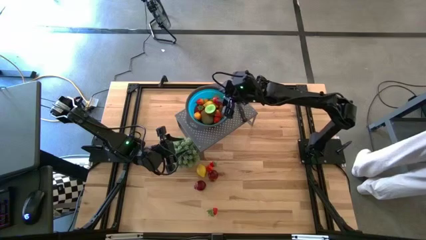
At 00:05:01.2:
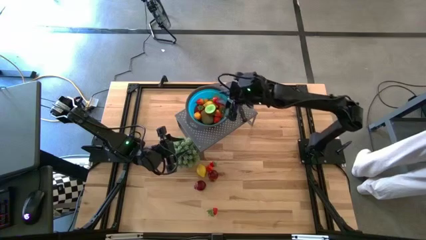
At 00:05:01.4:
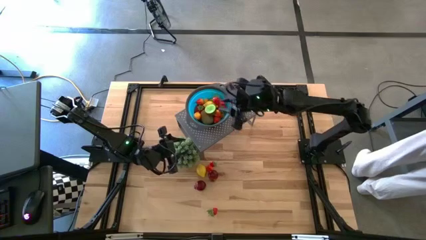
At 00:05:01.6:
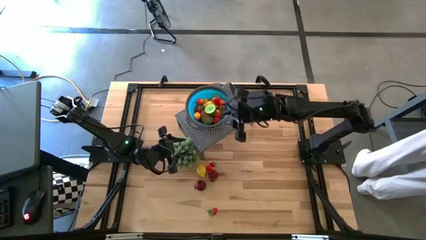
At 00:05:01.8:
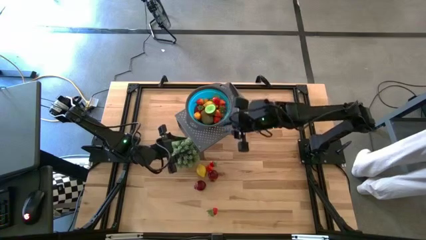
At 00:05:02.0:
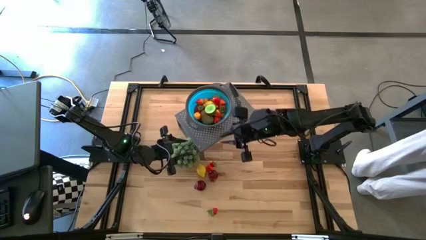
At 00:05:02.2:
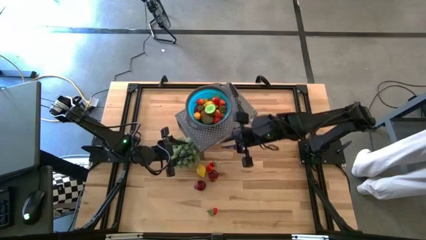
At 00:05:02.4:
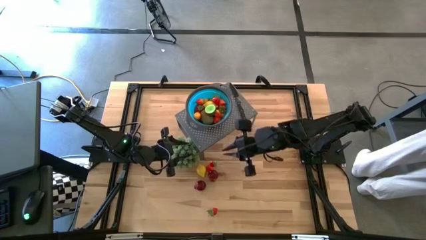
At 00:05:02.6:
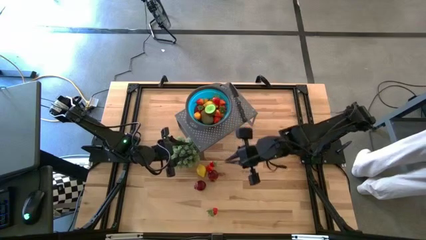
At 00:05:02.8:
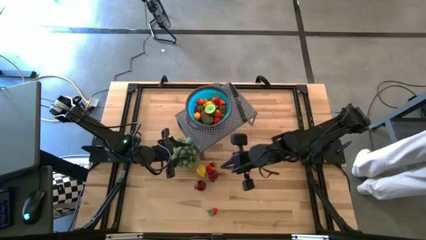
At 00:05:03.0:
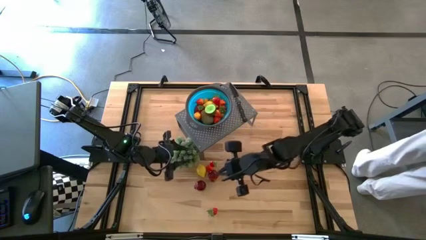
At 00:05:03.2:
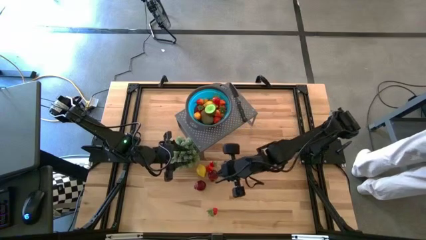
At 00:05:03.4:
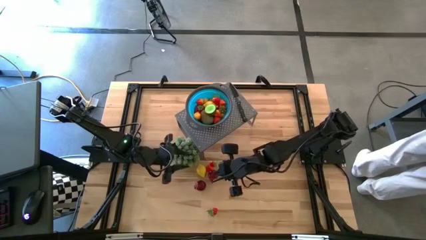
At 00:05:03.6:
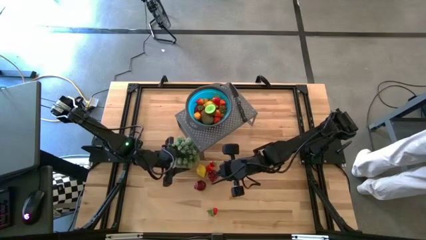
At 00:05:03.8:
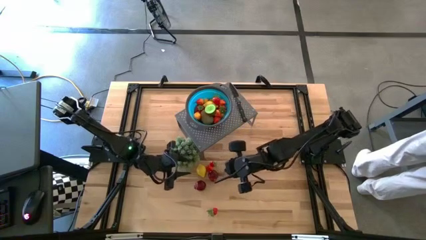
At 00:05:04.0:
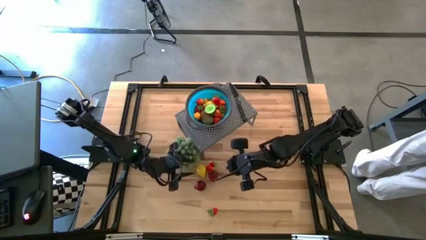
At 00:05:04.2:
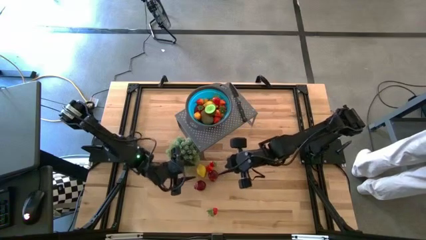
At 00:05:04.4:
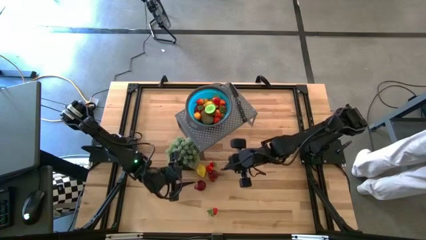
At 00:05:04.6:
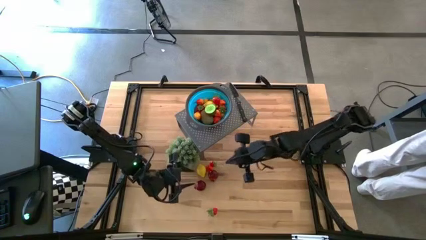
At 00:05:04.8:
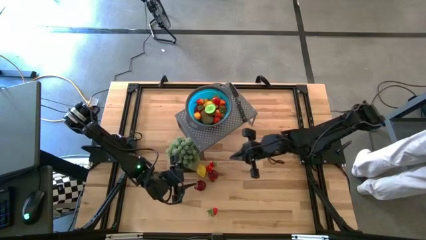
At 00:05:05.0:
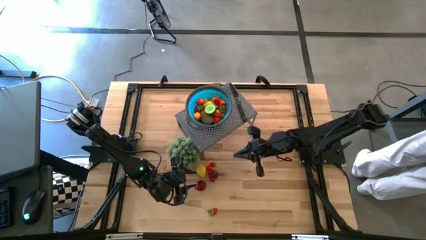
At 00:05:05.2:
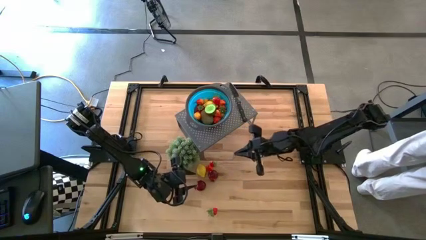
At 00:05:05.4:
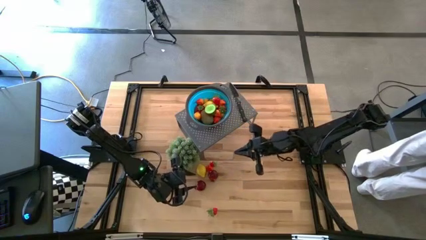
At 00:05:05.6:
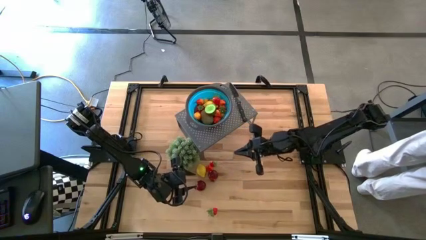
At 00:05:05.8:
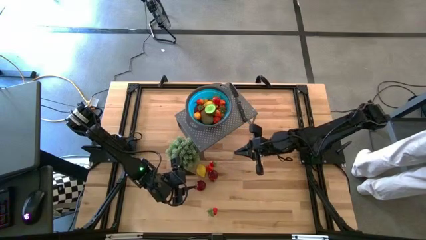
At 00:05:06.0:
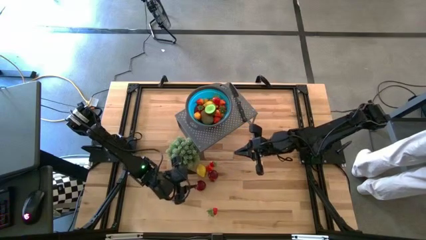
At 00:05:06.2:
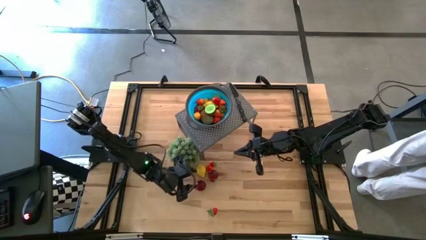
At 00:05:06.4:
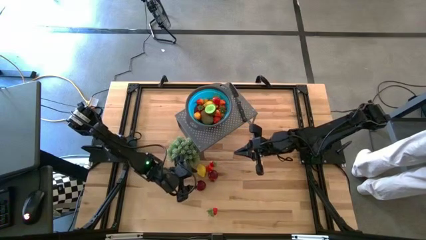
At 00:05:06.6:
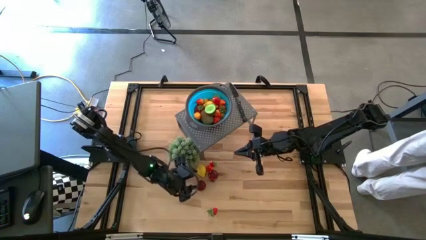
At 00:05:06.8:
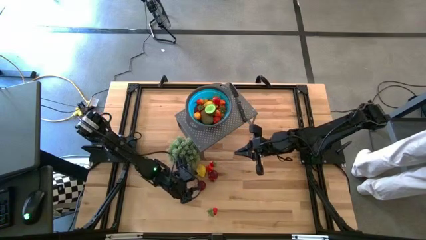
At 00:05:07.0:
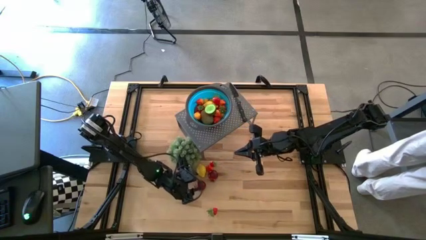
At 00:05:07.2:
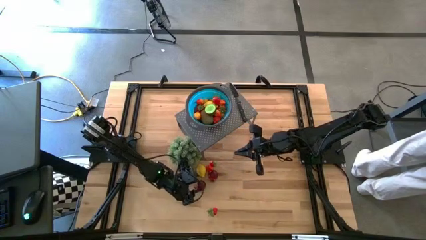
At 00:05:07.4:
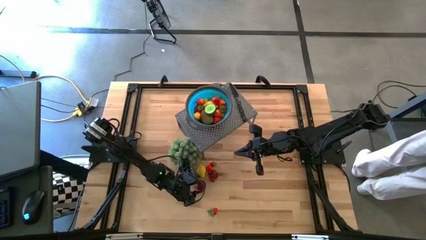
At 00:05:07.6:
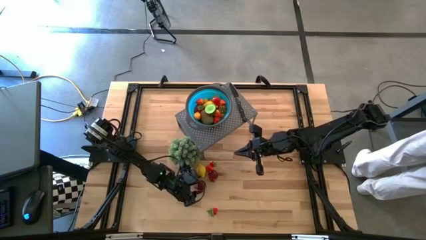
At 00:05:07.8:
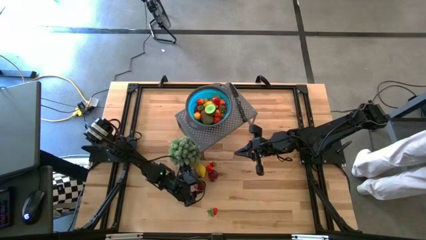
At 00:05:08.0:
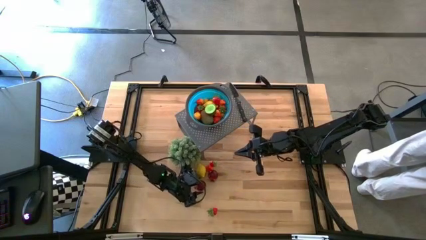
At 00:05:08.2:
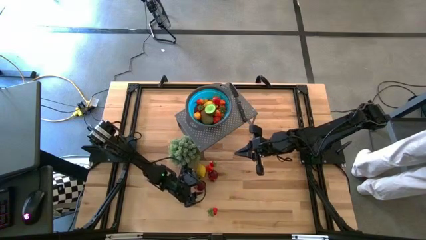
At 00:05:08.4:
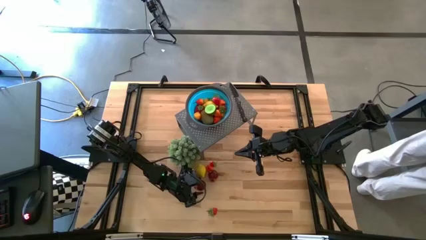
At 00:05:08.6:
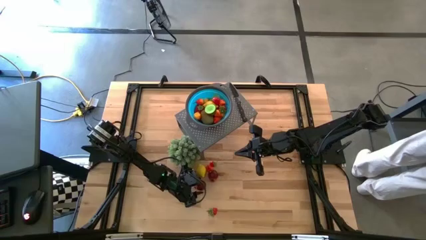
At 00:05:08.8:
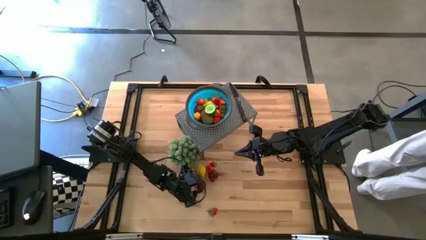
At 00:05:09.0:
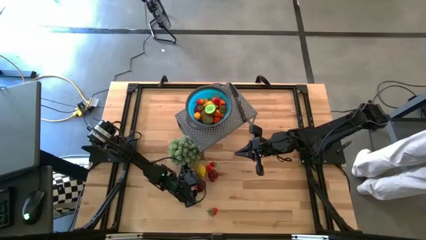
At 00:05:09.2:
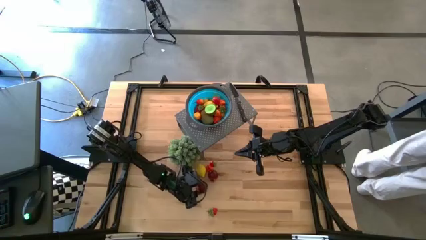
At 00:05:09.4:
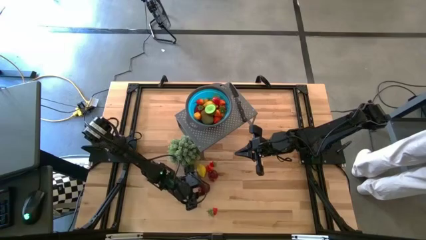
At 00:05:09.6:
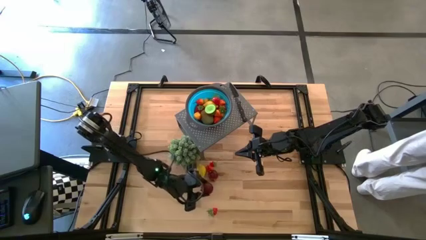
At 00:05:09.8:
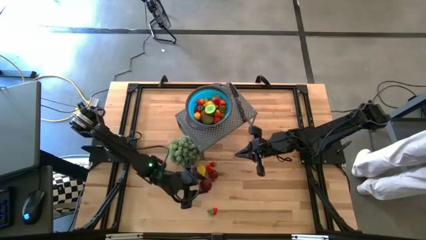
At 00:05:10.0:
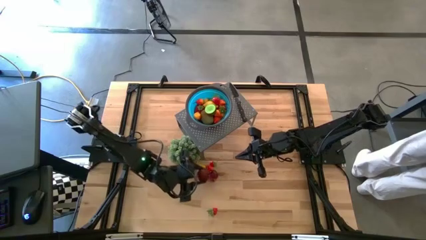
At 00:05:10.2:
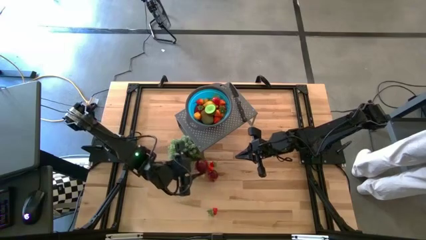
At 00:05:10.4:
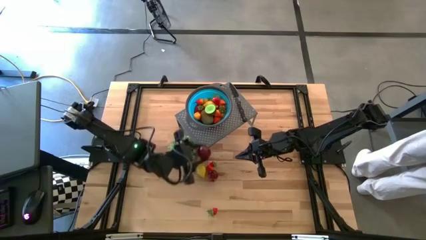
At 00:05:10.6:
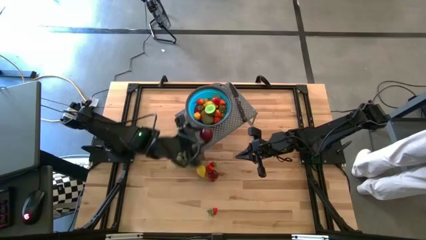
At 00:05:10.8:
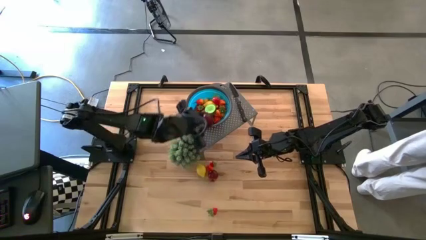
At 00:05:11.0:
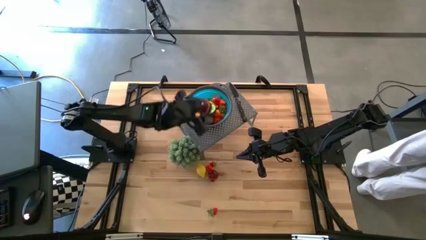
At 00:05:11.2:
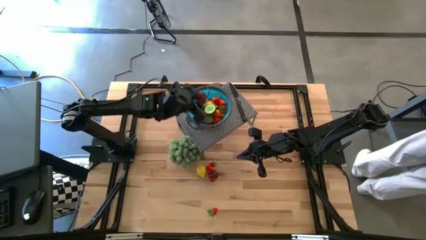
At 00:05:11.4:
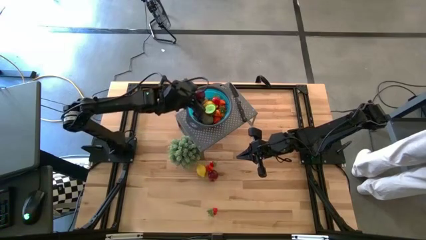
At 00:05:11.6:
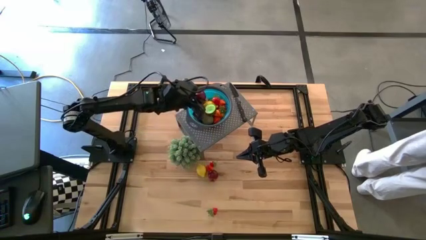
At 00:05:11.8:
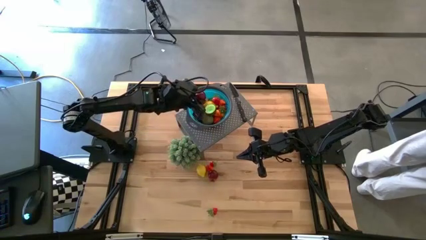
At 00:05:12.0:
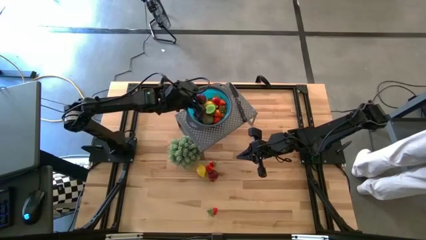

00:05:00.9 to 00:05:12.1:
Task: Pick & Place Fruit
Put the pomegranate into the blue strainer bowl on the shelf
